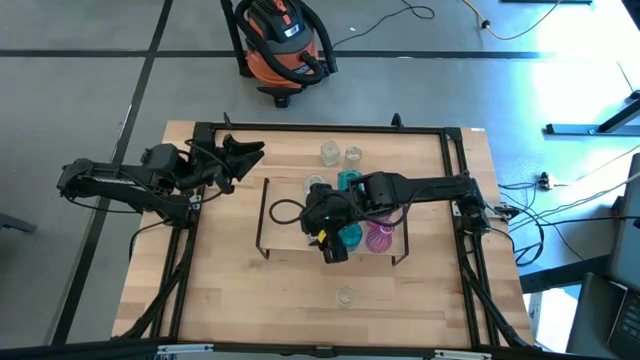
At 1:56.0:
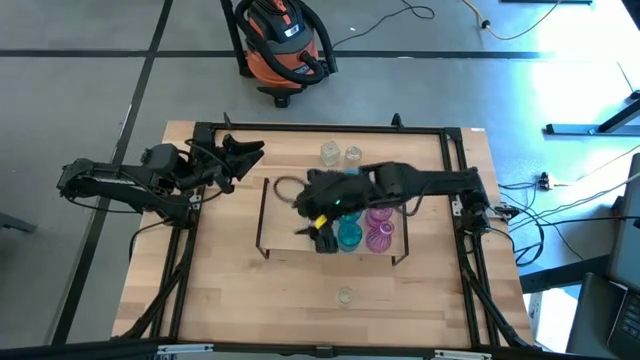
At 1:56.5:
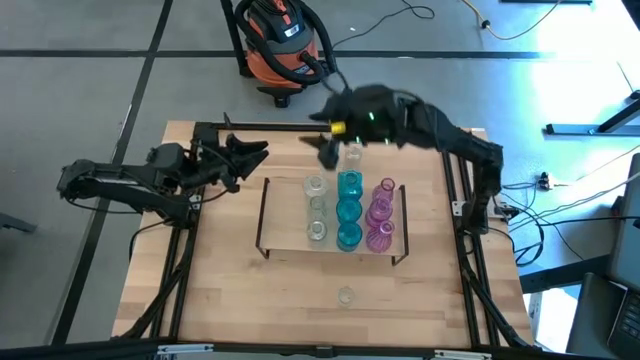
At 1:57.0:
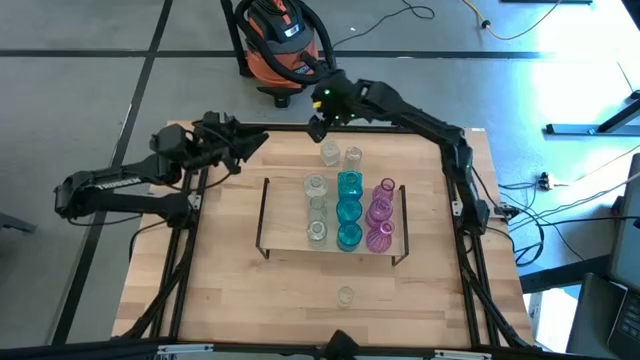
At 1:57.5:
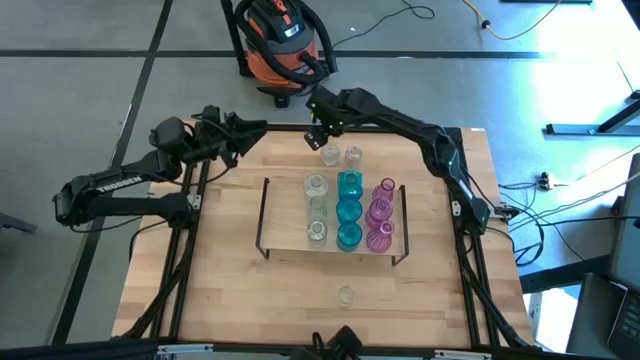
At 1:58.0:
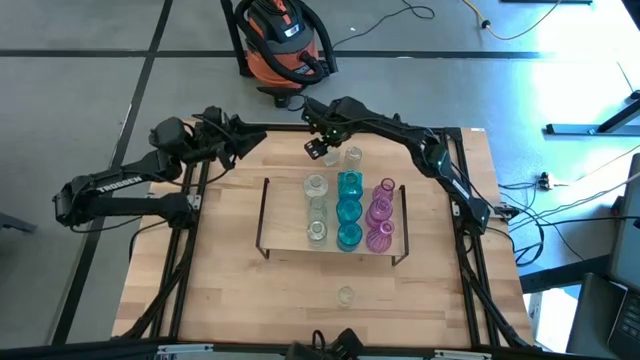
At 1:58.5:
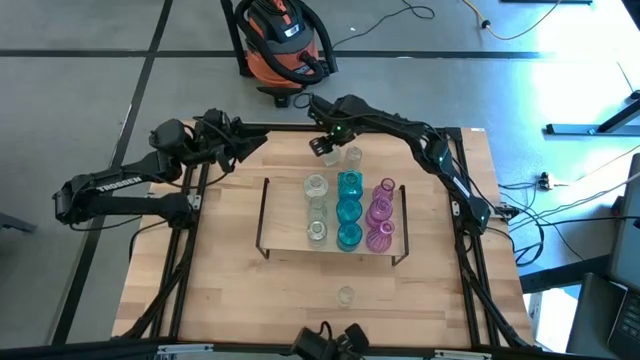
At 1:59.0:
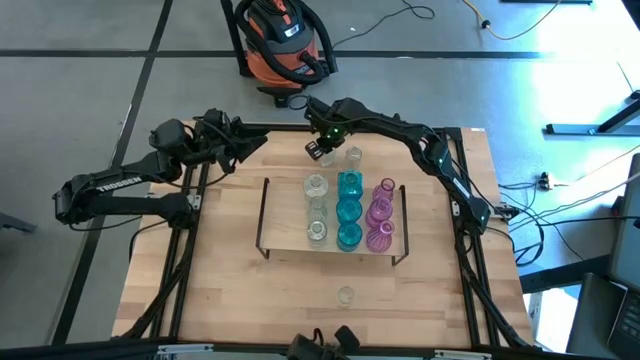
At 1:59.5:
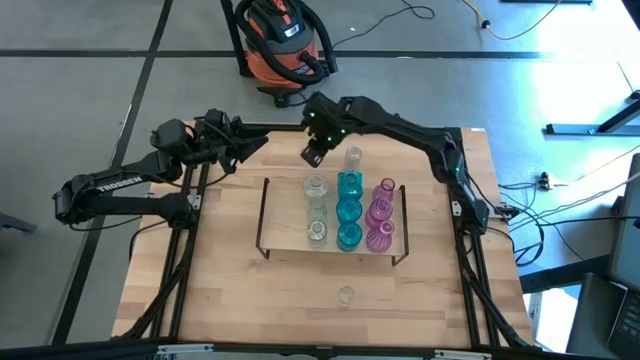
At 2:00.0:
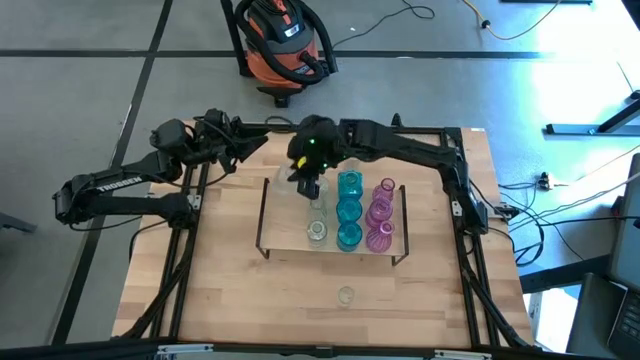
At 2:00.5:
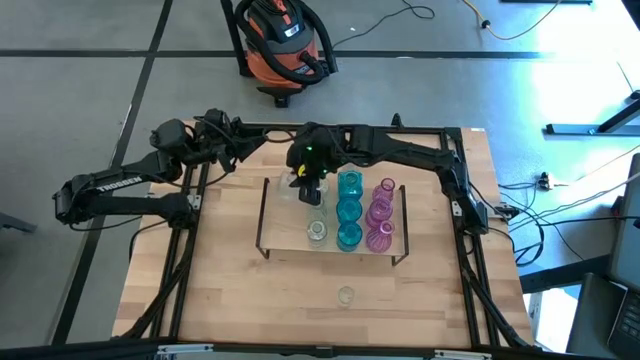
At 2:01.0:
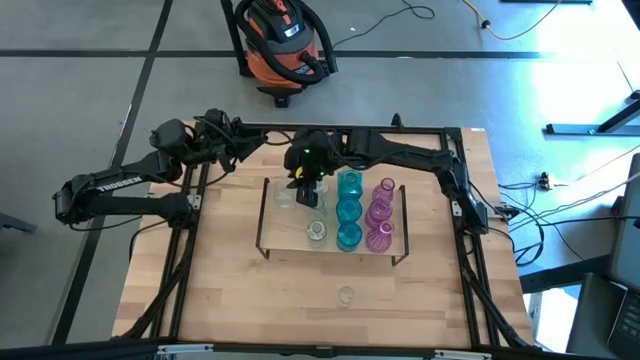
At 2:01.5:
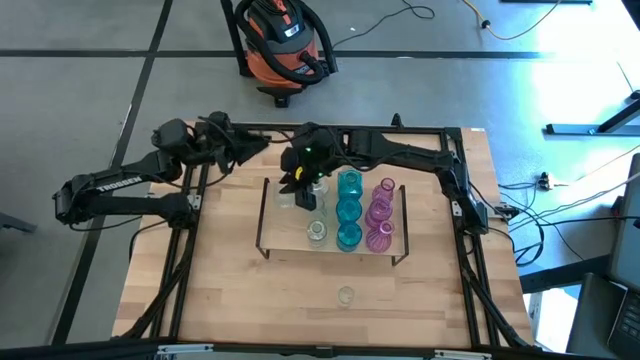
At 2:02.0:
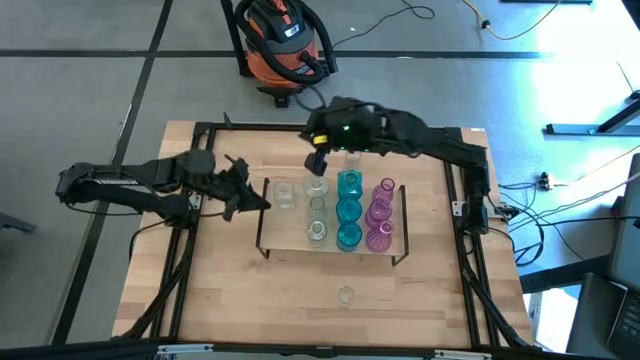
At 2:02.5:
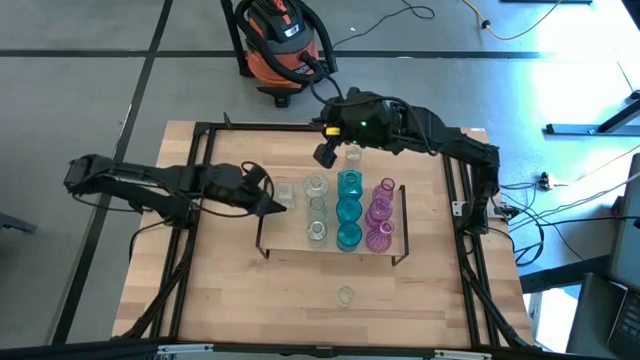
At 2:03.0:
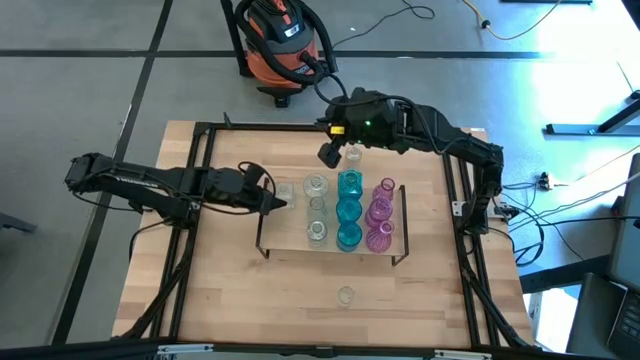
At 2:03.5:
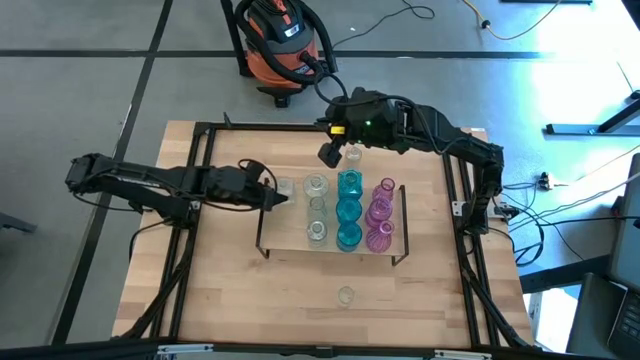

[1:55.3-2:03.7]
Task: sort vases onto shelf
Put the top left transparent vase on the shelf

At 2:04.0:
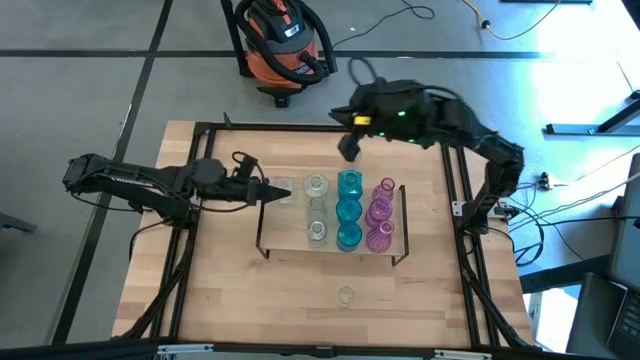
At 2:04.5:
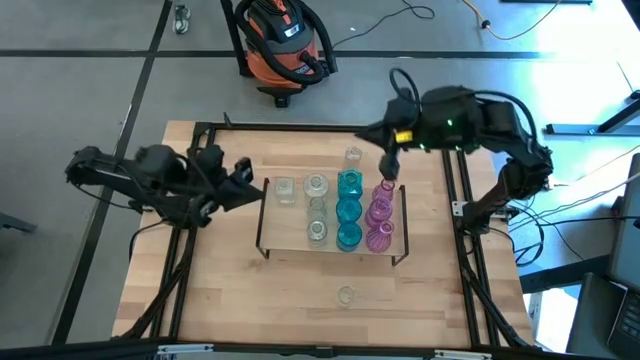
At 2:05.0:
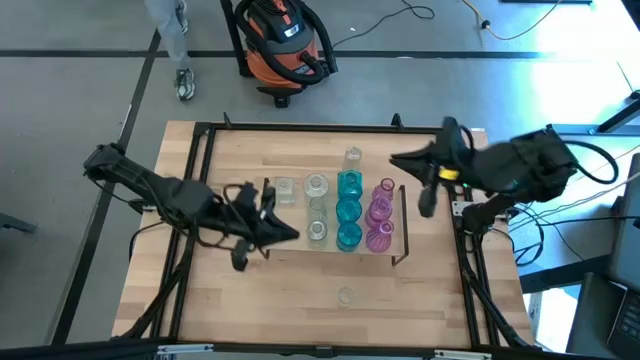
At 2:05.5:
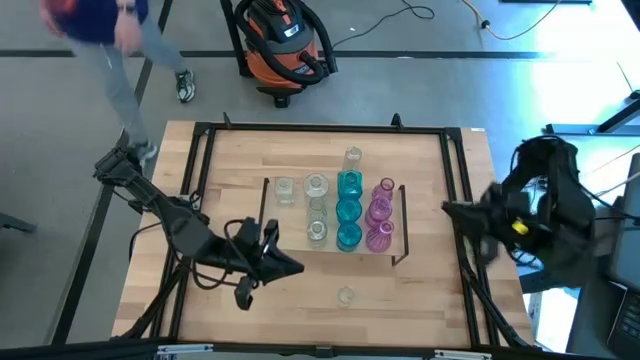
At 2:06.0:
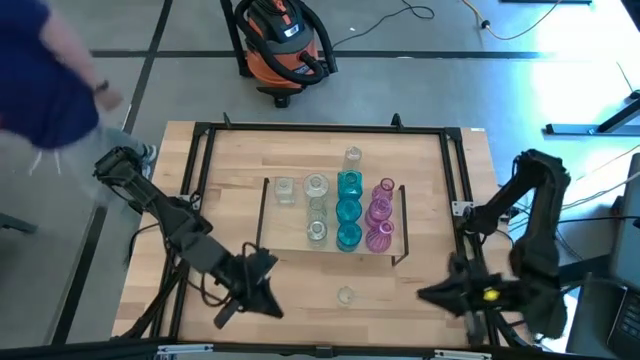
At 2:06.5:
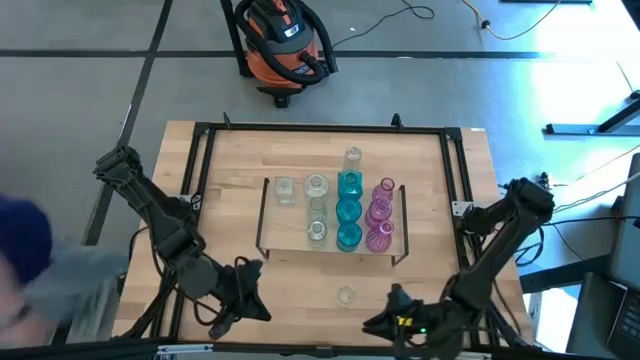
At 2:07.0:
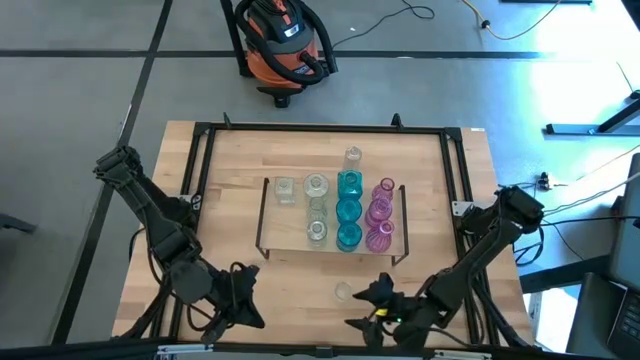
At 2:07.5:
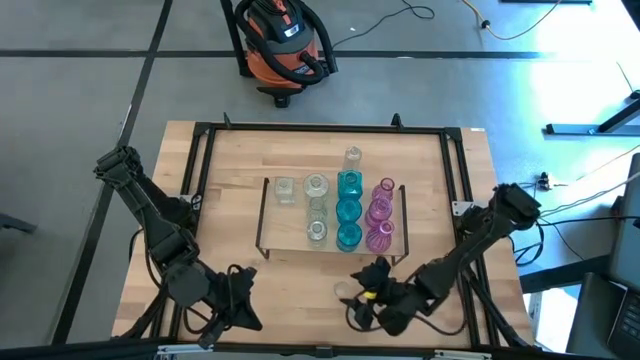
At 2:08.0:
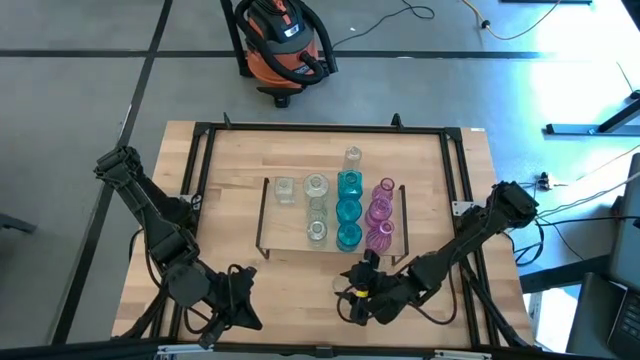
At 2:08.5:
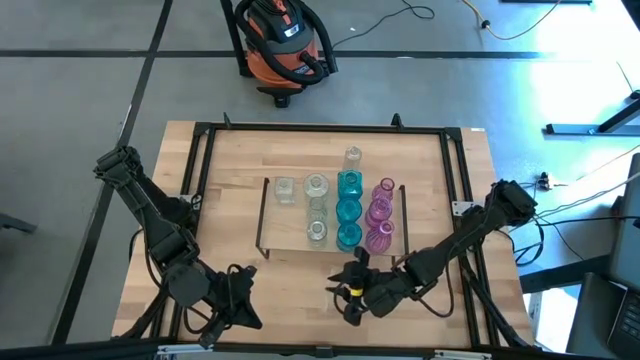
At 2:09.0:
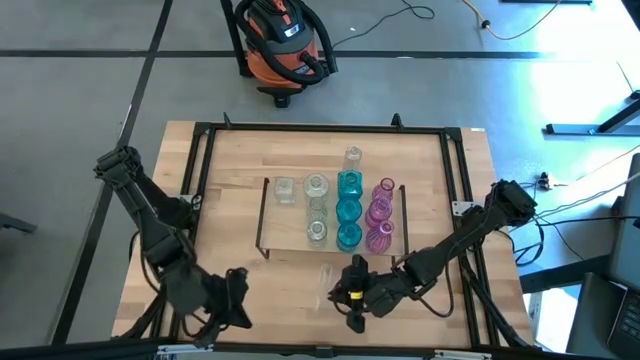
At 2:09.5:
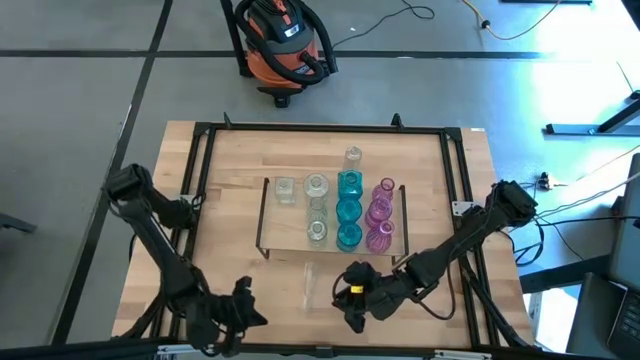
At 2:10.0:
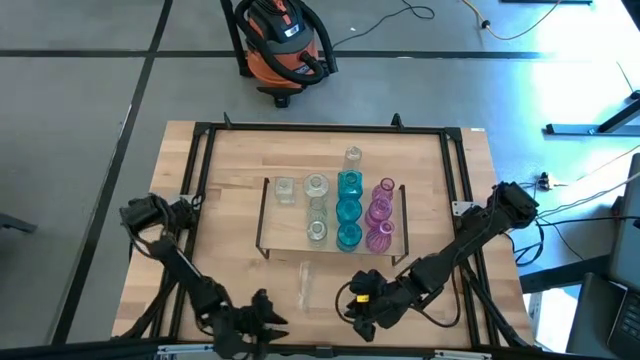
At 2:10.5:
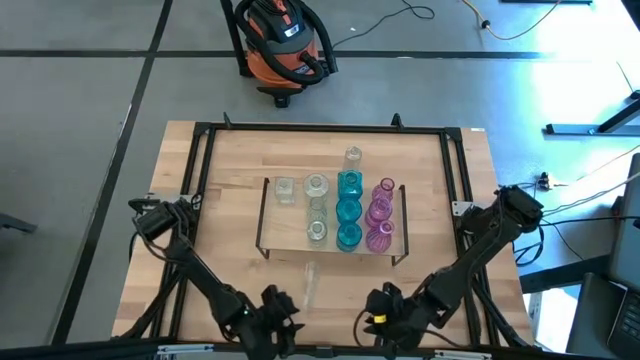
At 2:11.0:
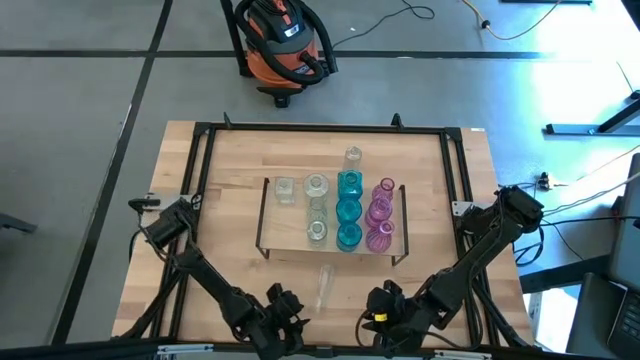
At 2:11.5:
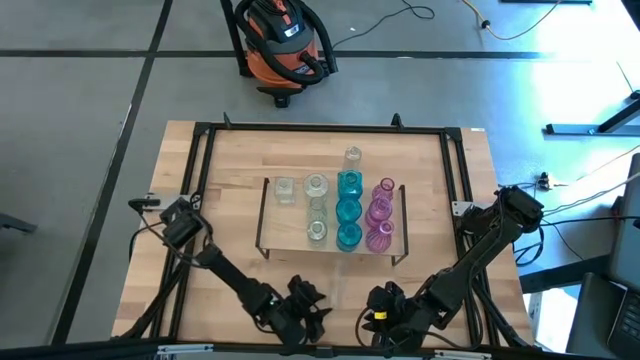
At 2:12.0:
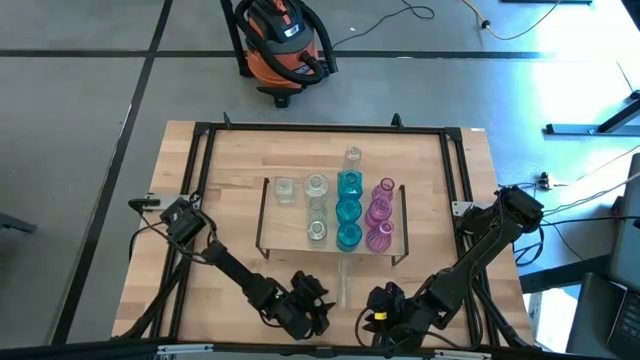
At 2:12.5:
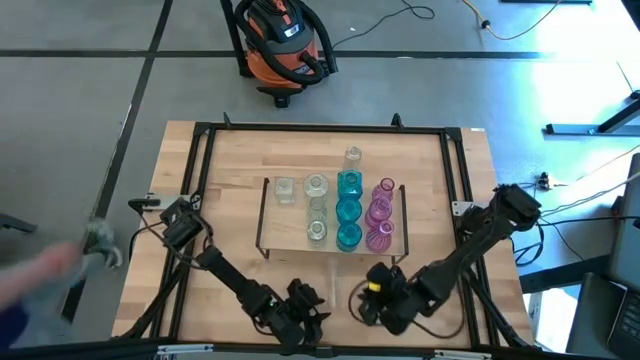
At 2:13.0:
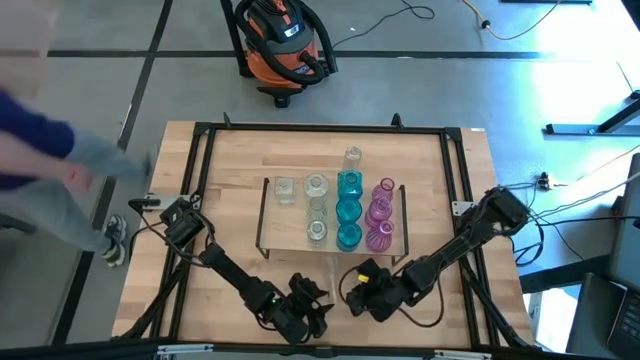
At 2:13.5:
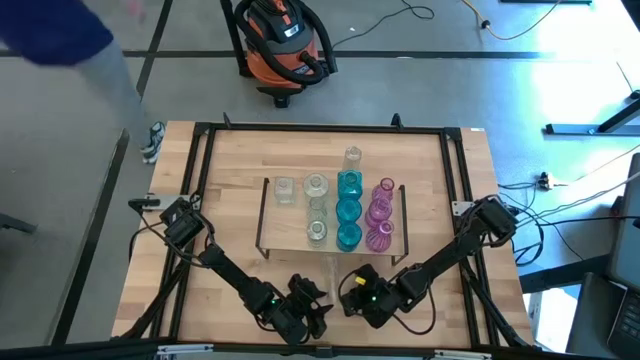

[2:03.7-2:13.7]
Put the bottom transparent vase on the shelf

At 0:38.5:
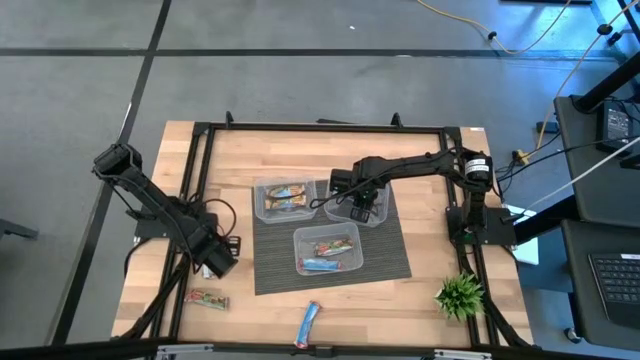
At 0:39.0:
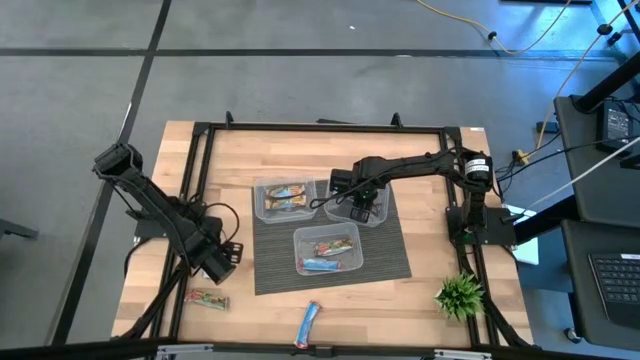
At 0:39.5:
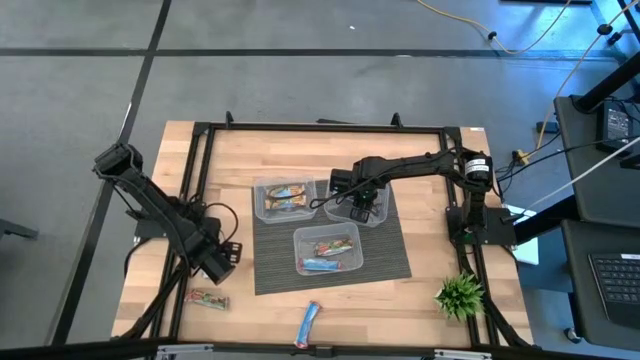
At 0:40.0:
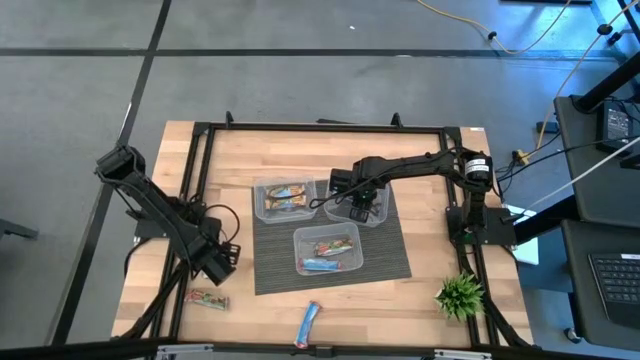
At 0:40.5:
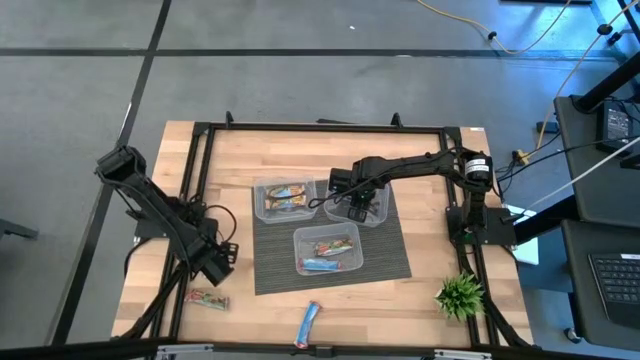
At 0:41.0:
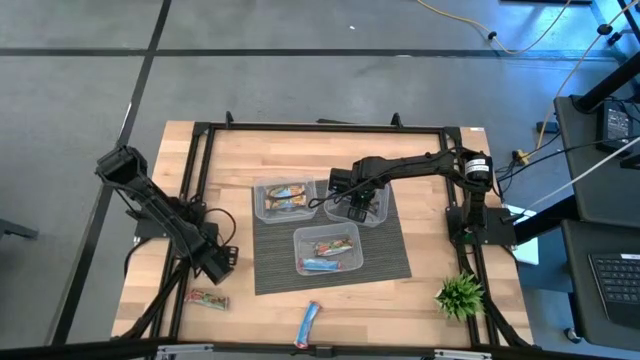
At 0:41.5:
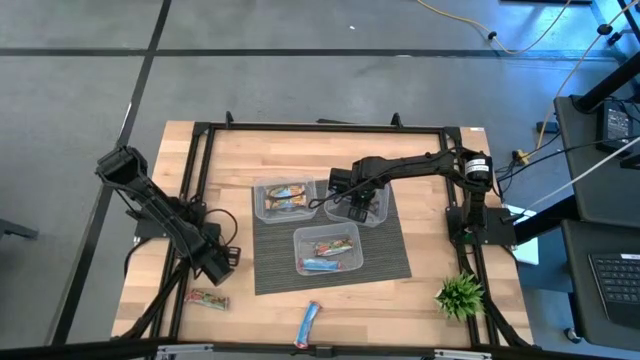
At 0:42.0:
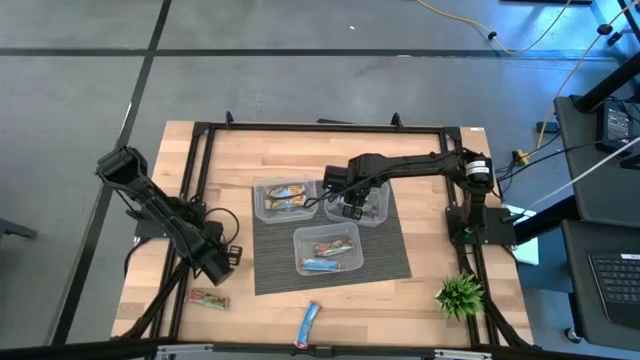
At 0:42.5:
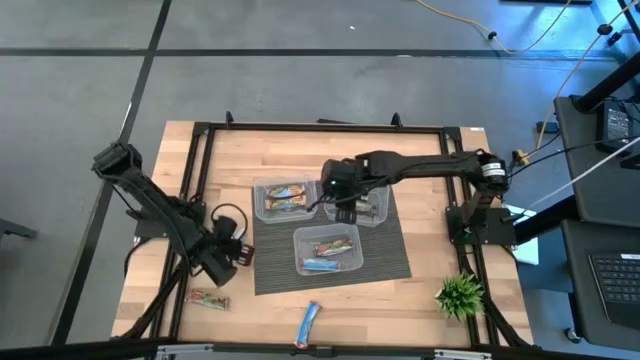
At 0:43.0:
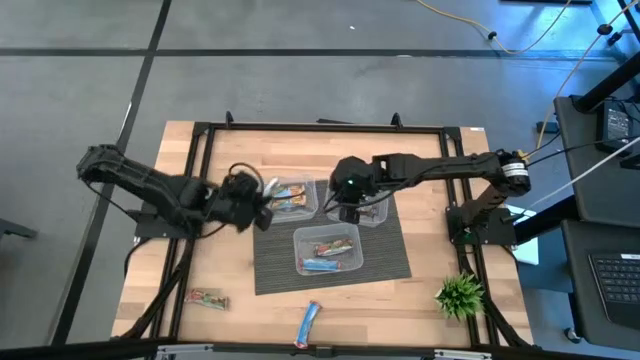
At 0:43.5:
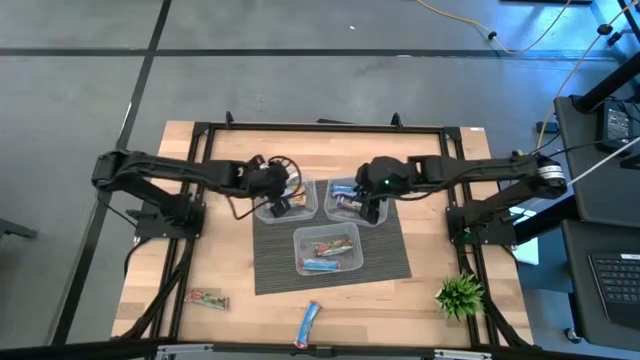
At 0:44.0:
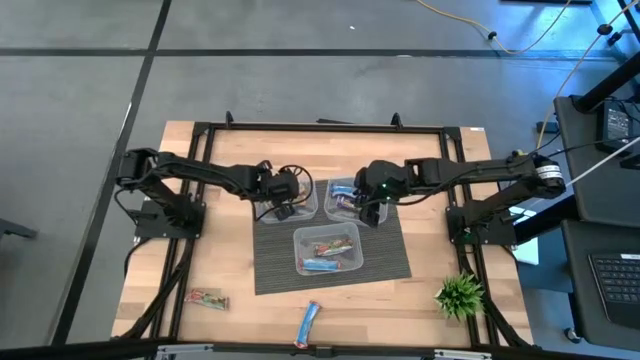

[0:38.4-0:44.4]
Task: Pick and place Granola Bars by type
Put the yellow granola bar into the top left transparent bin
